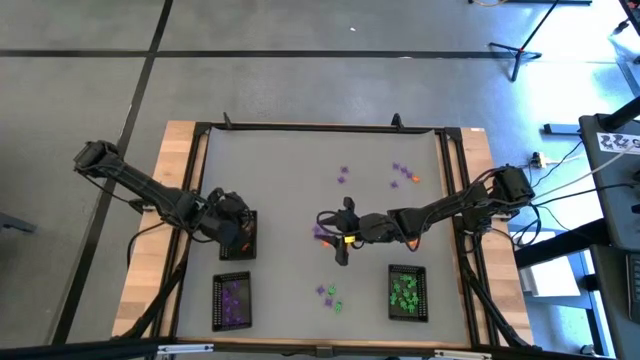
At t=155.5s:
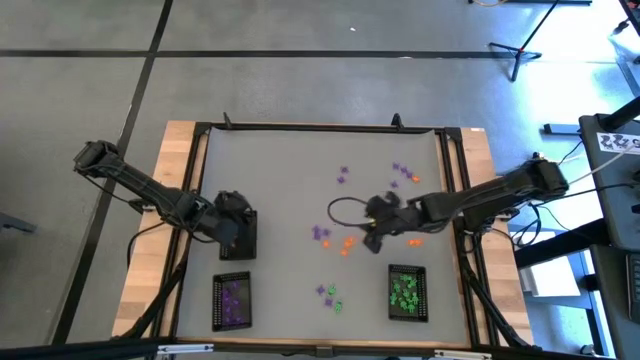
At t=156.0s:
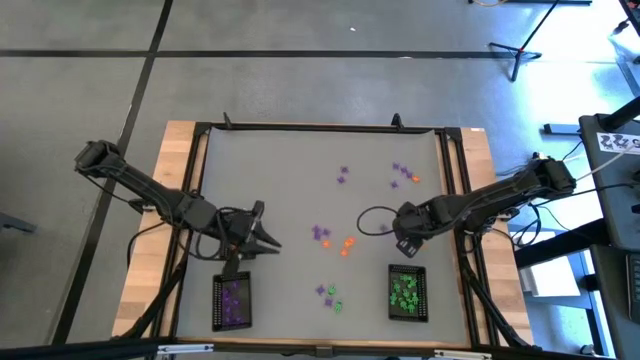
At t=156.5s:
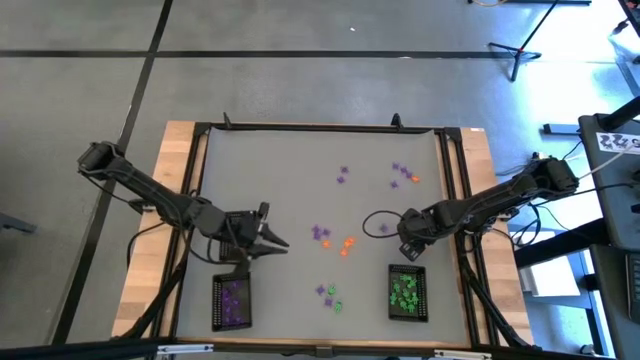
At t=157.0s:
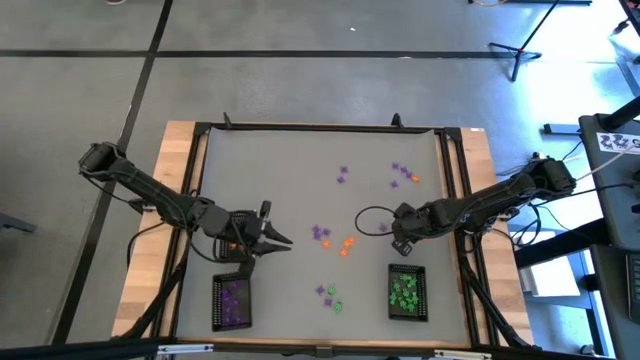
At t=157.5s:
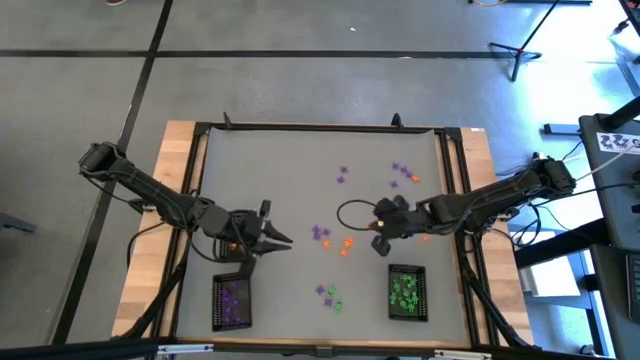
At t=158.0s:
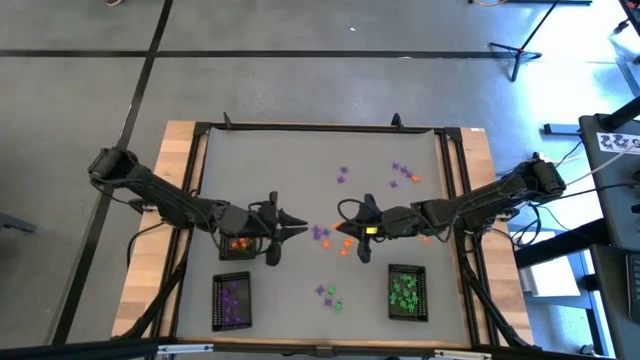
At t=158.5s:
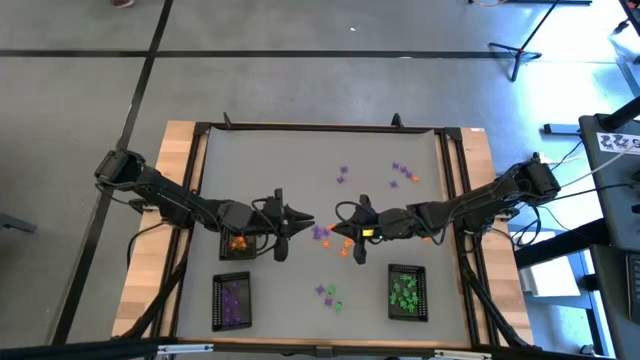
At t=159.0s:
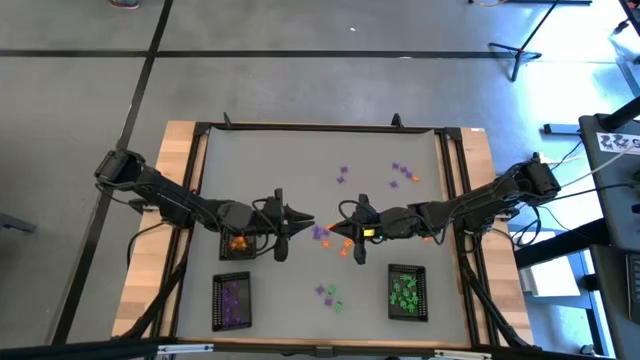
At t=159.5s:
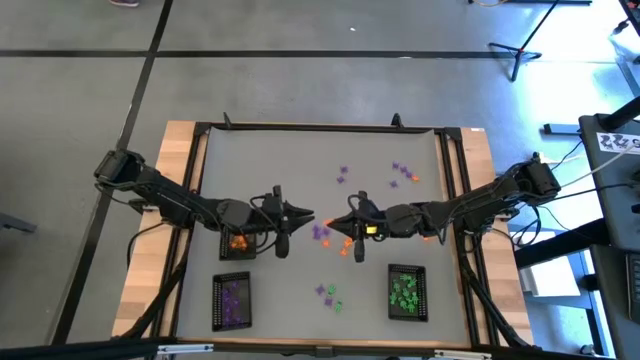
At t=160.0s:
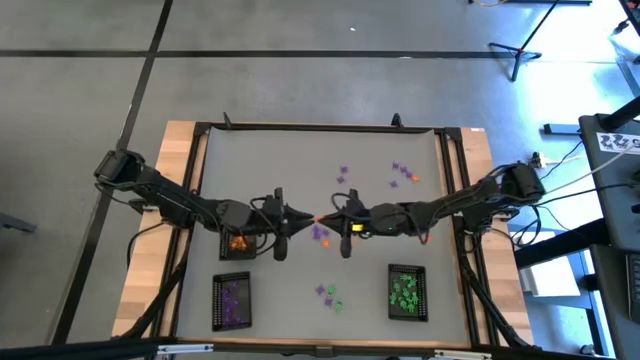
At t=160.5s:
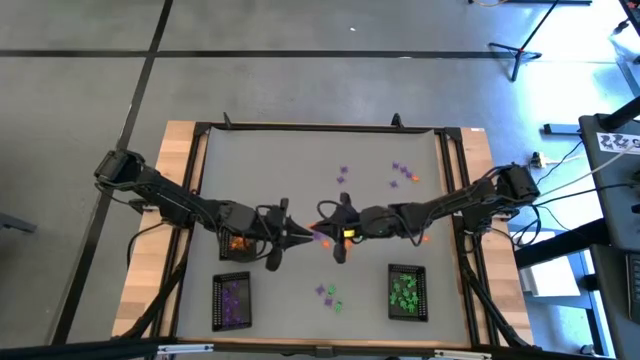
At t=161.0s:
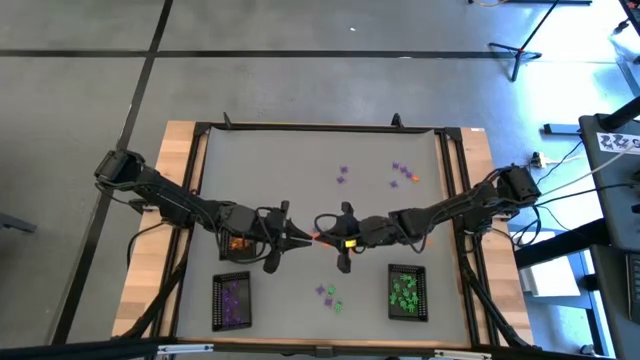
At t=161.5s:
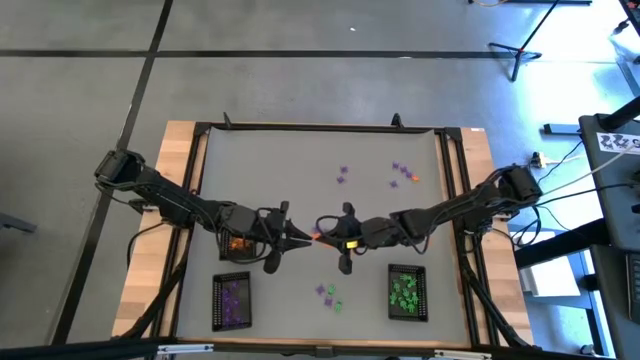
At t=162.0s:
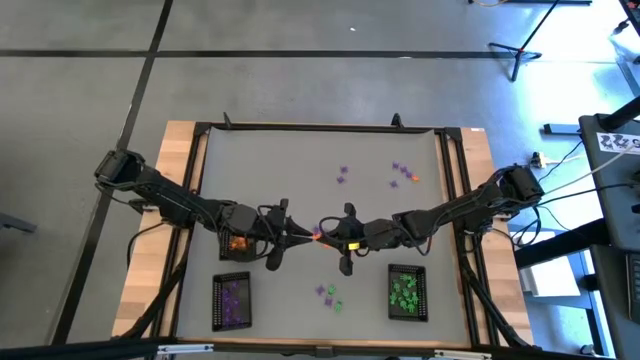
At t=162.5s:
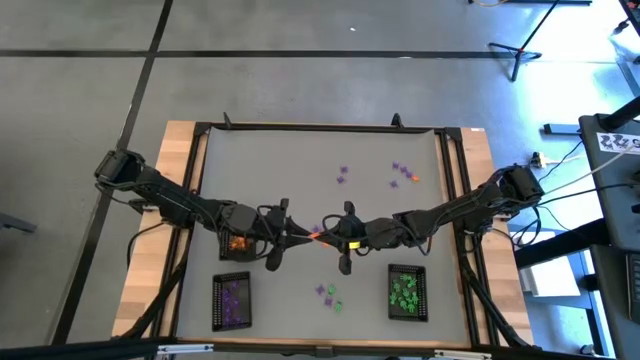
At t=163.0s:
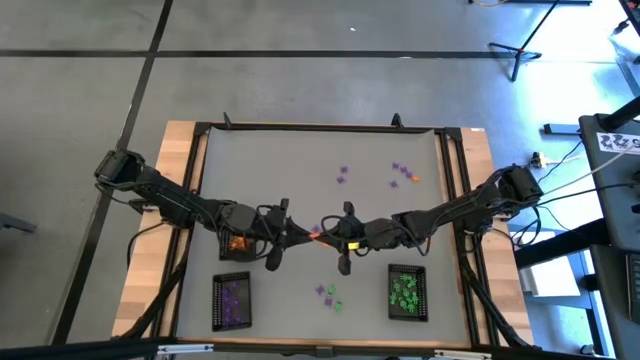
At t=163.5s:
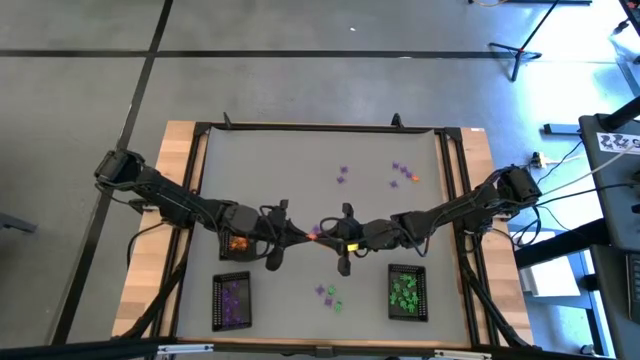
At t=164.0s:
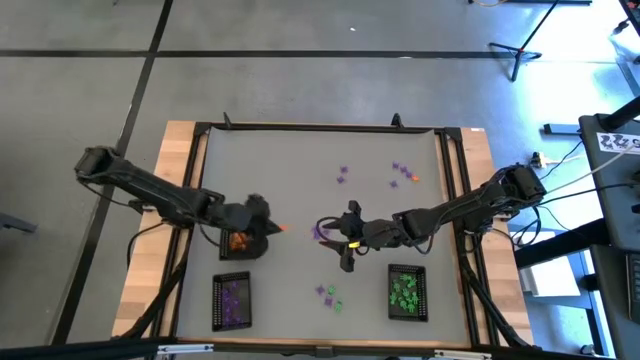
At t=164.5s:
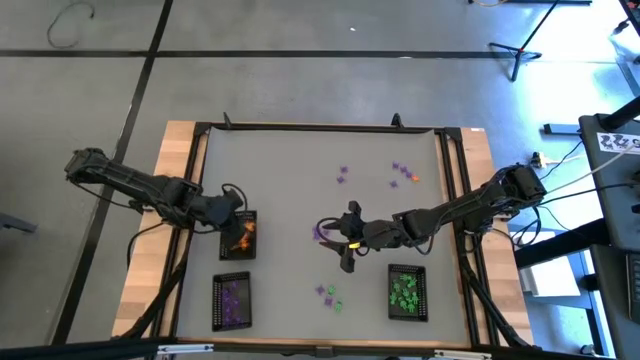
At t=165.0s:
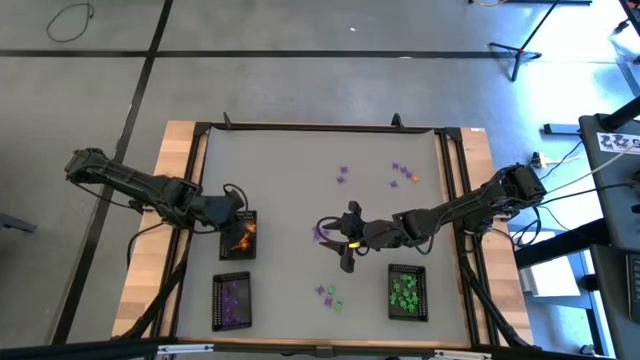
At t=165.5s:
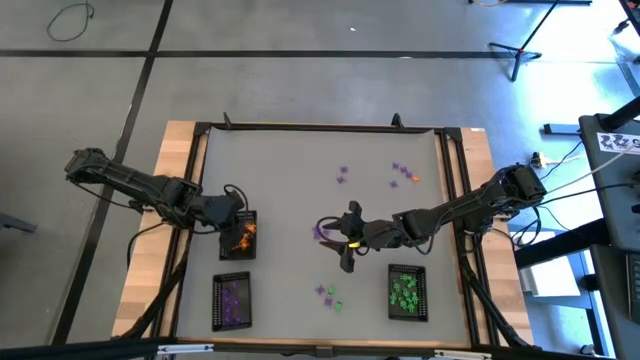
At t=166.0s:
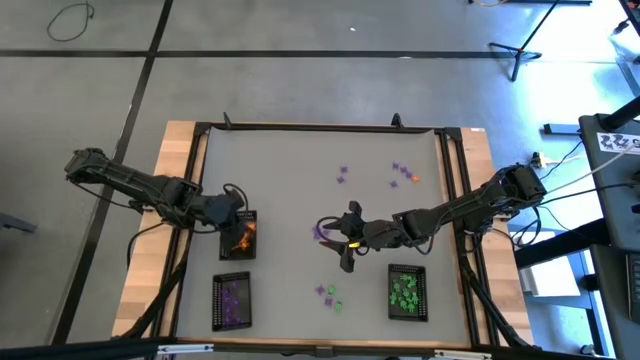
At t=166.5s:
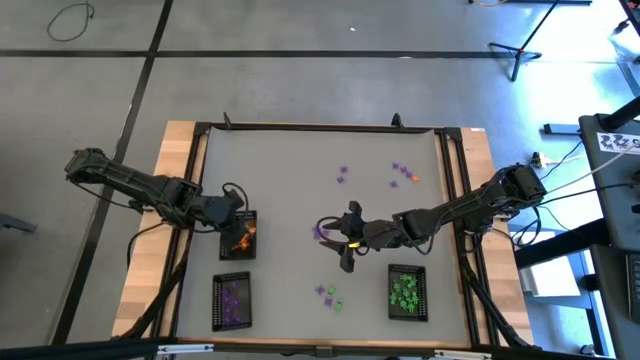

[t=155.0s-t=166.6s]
Task: Sort Halloween decoration
Put the orange spider toy into the top black basket

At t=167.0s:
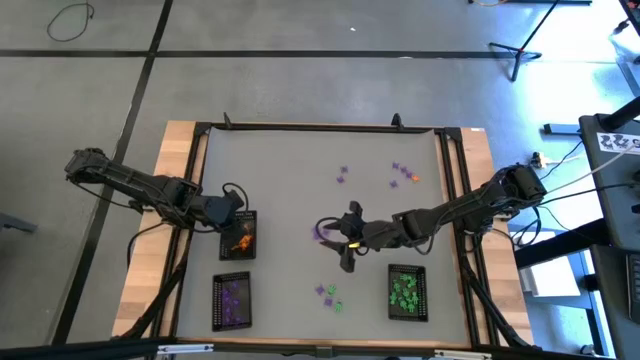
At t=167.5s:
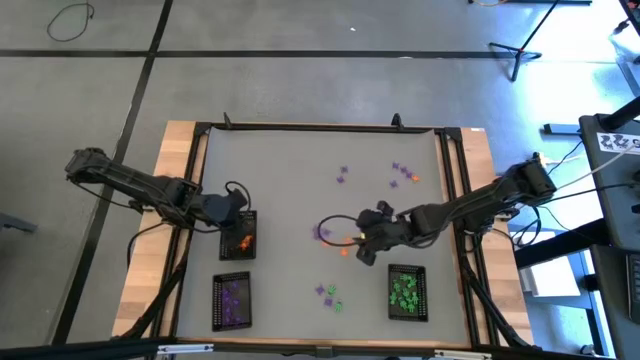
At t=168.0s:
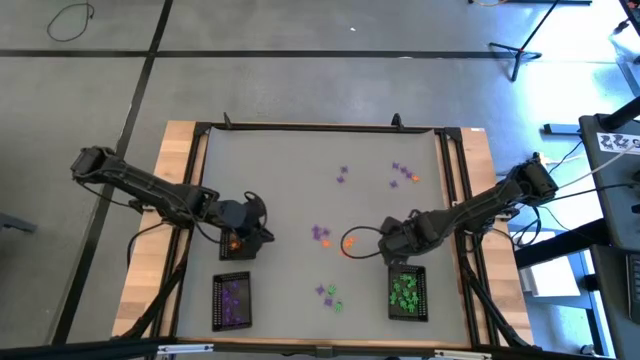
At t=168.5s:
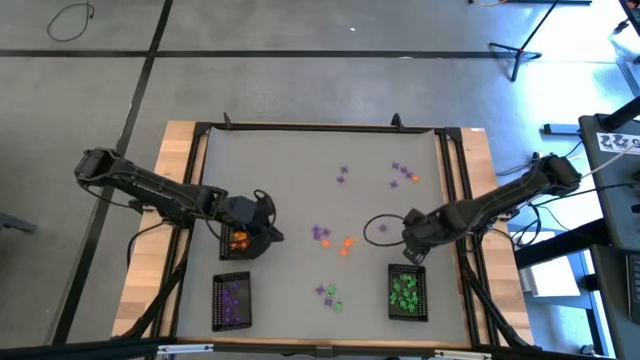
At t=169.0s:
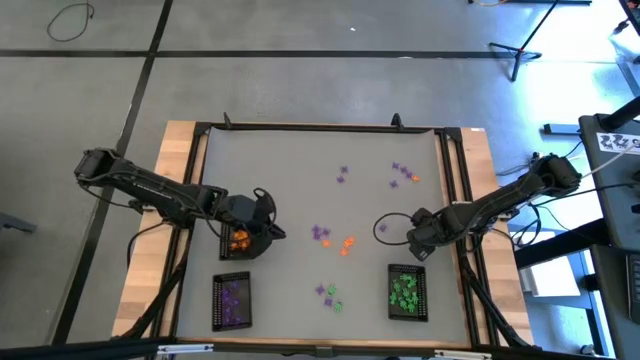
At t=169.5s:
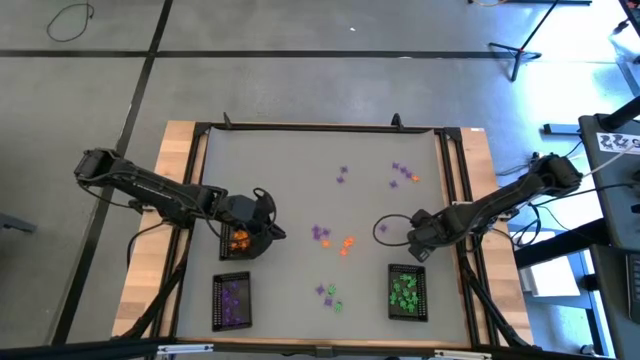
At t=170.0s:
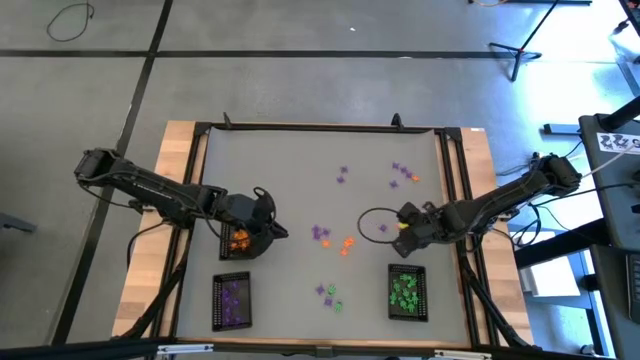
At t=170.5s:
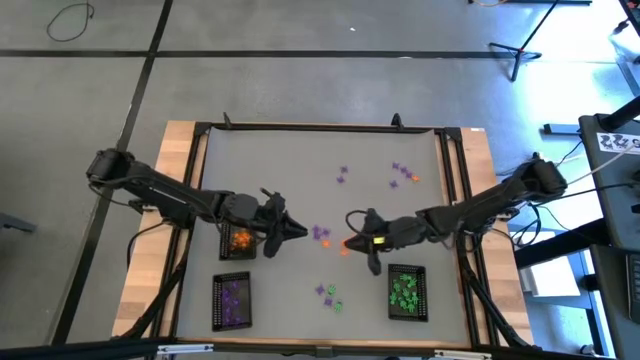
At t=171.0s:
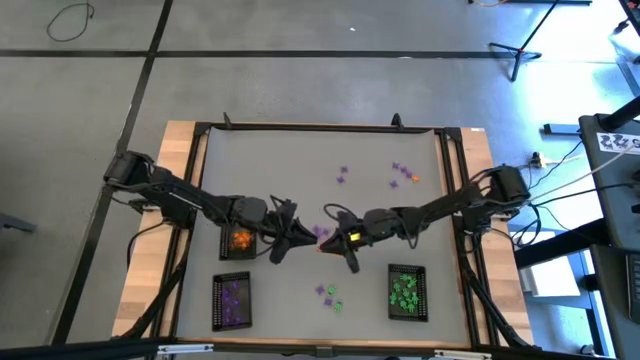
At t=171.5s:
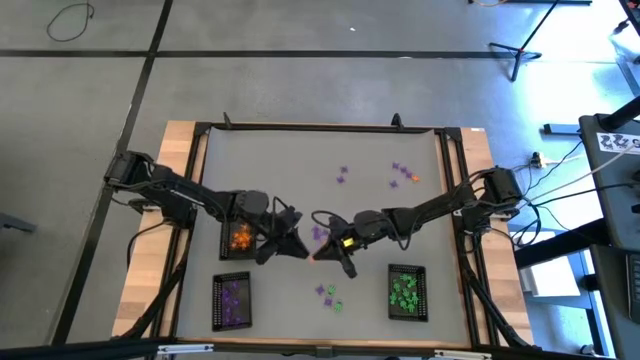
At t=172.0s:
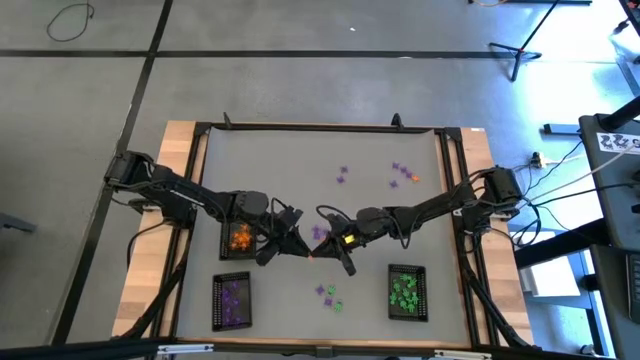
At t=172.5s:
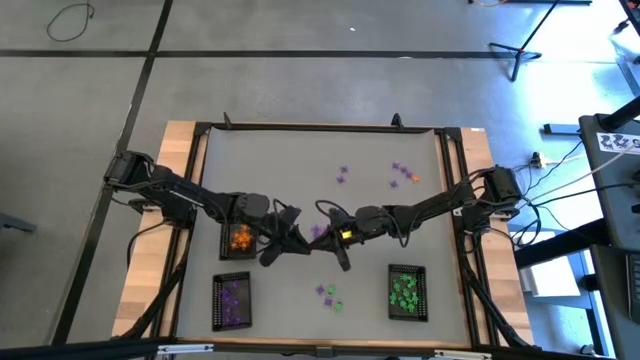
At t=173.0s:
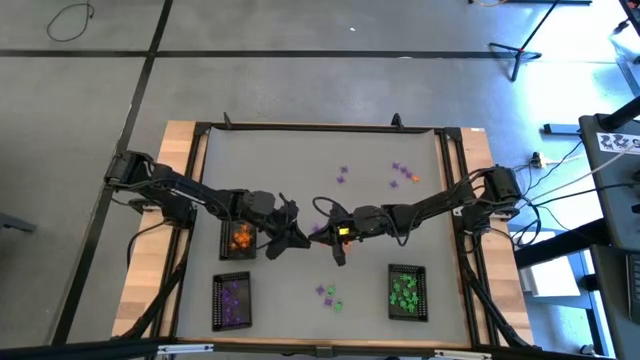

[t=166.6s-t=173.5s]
Put the orange spider toy into the top black basket

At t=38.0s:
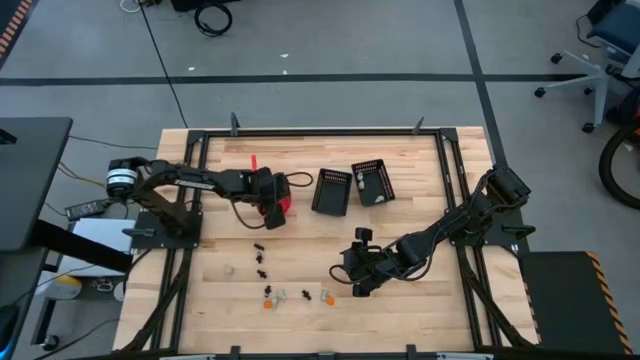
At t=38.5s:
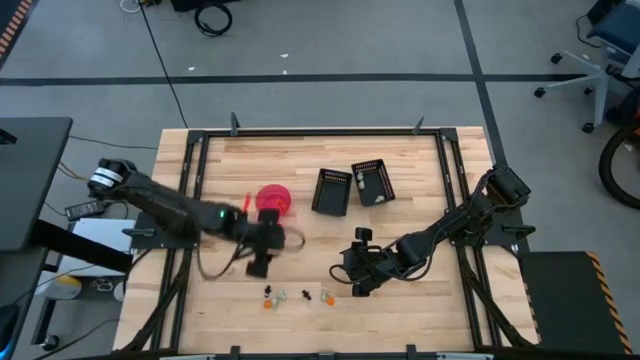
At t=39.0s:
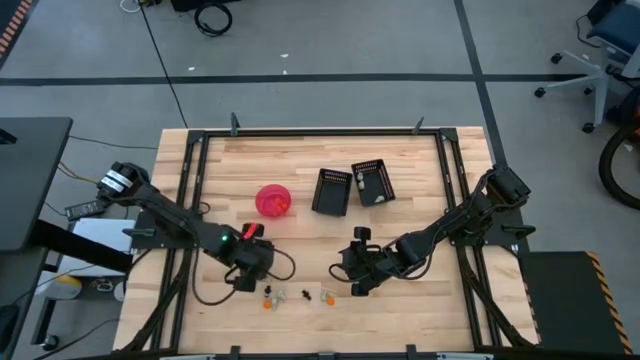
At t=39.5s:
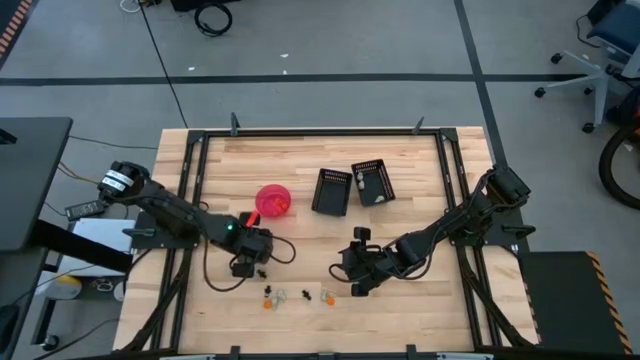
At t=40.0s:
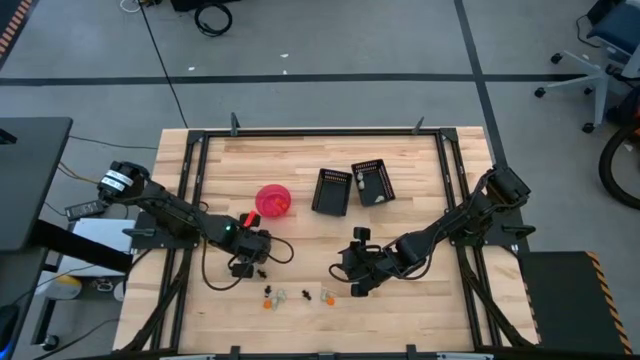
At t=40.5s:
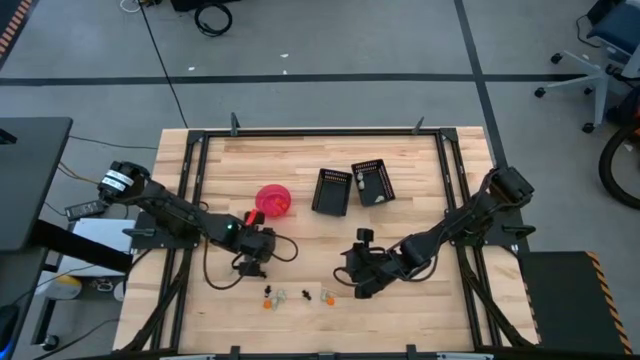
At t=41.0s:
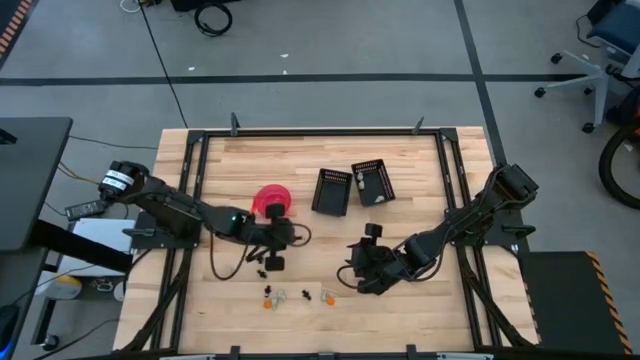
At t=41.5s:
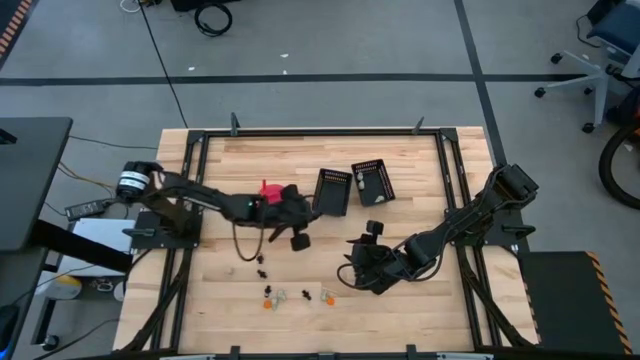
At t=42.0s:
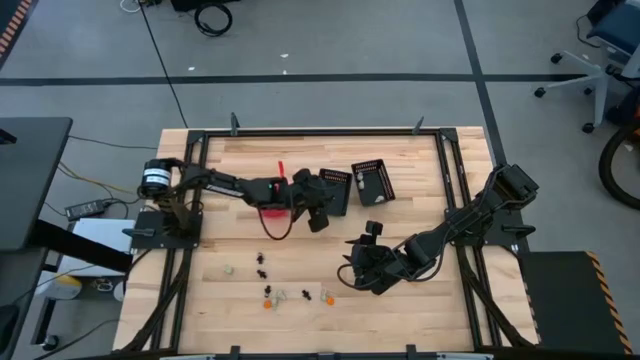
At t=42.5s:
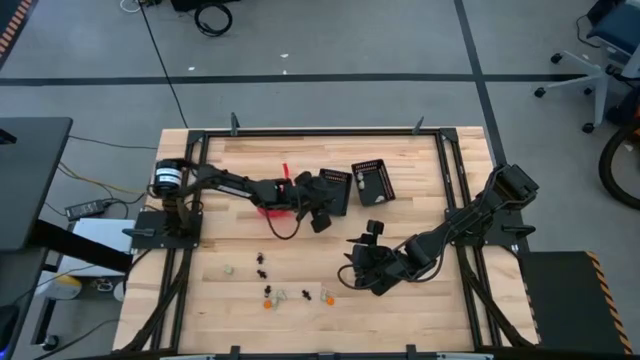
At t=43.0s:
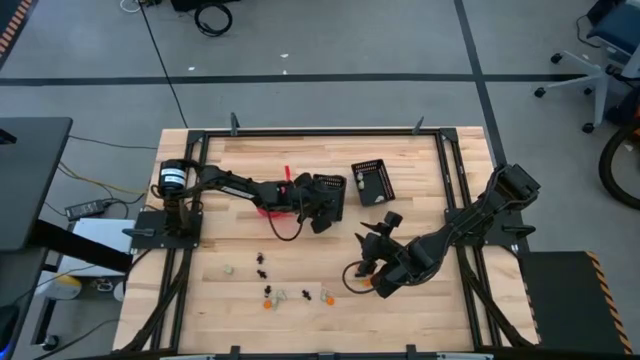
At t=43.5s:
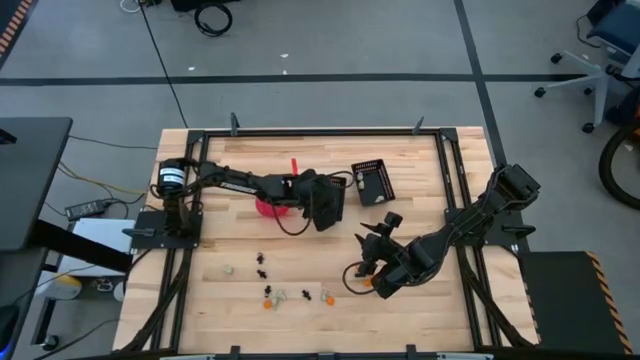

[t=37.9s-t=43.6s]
Task: Sort Halloween decoration
Put the black skeleton toy into the left black bin
